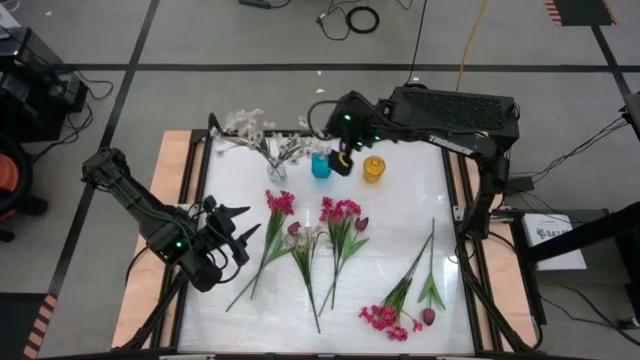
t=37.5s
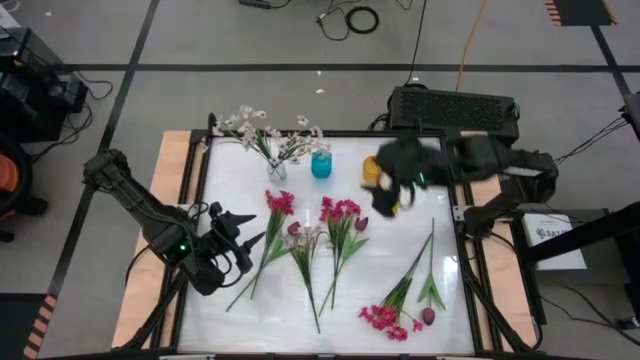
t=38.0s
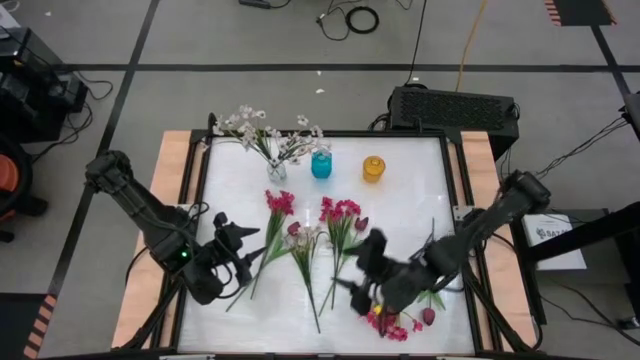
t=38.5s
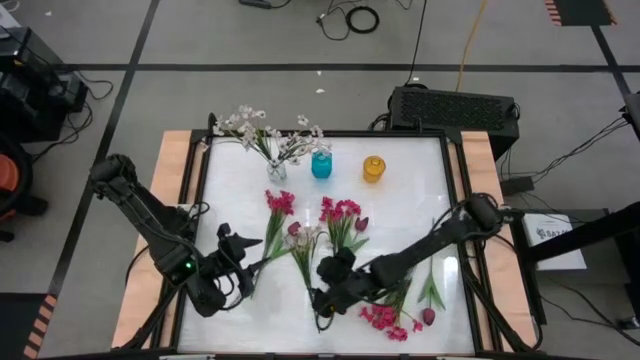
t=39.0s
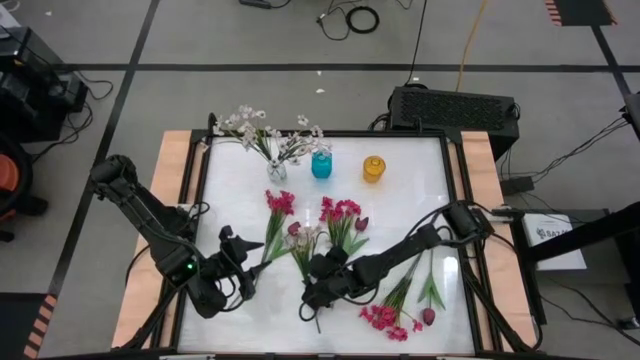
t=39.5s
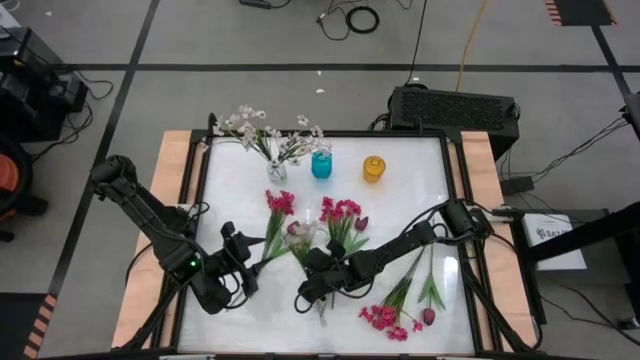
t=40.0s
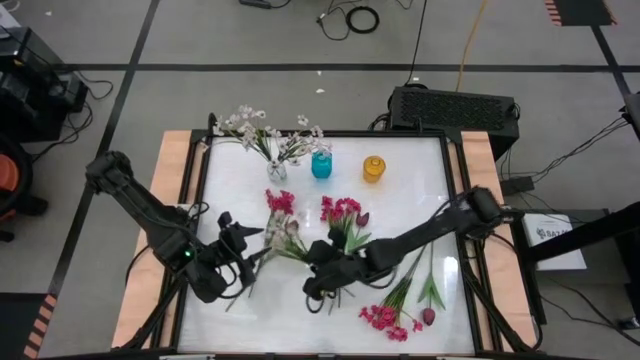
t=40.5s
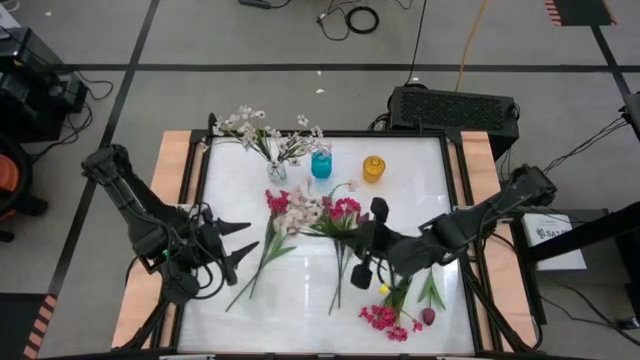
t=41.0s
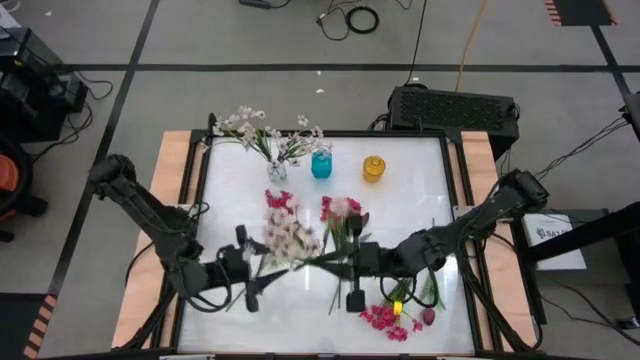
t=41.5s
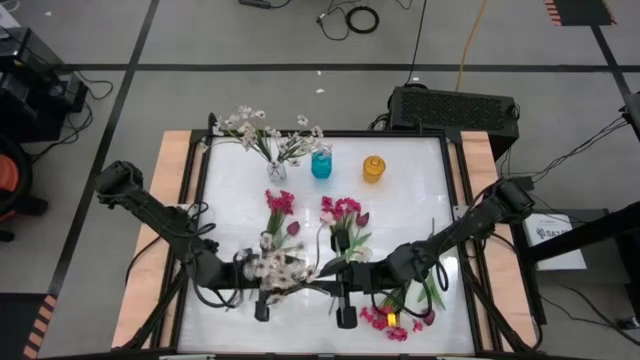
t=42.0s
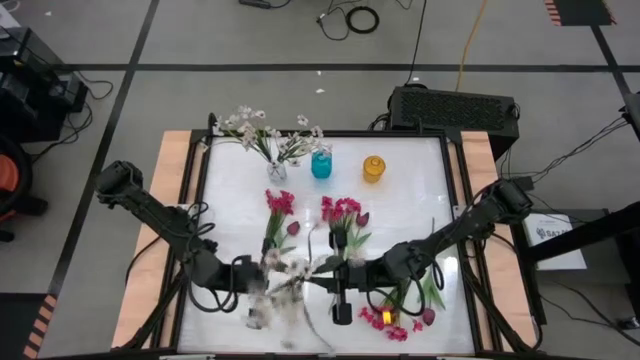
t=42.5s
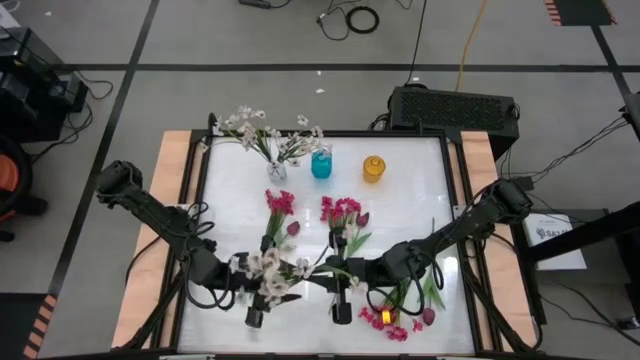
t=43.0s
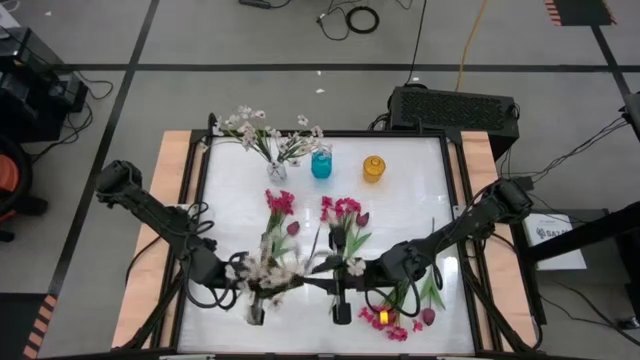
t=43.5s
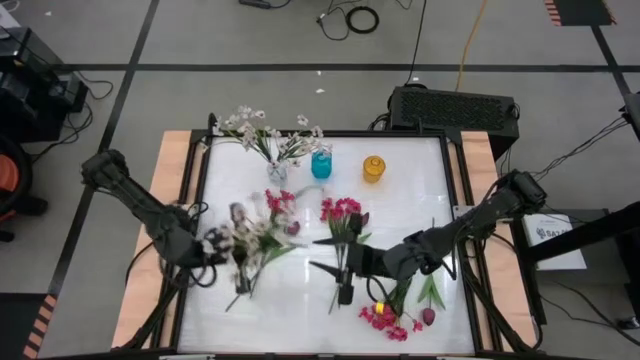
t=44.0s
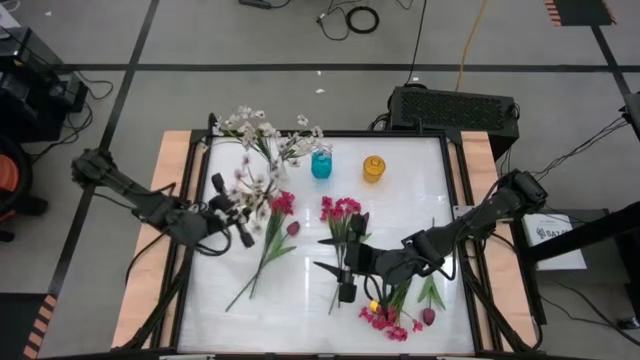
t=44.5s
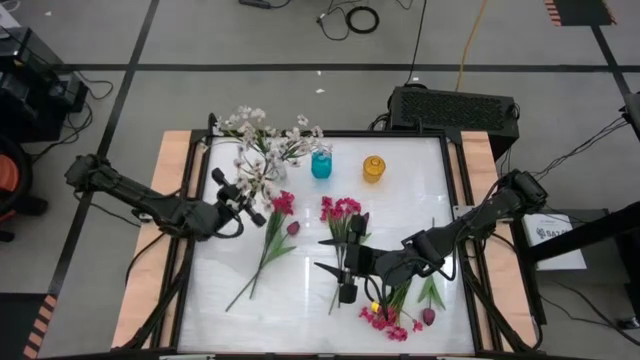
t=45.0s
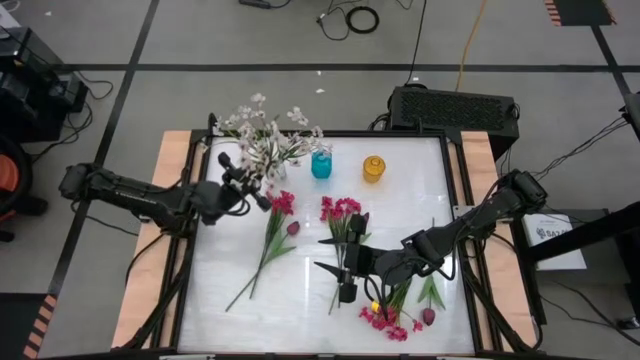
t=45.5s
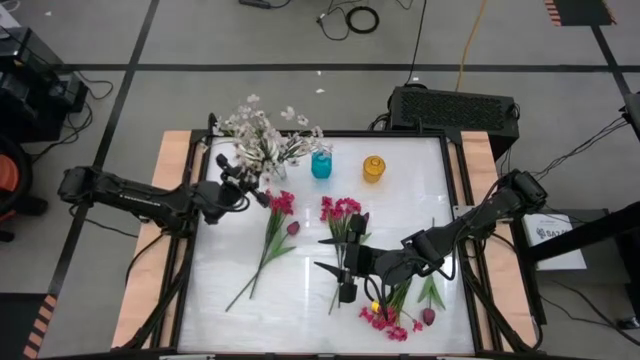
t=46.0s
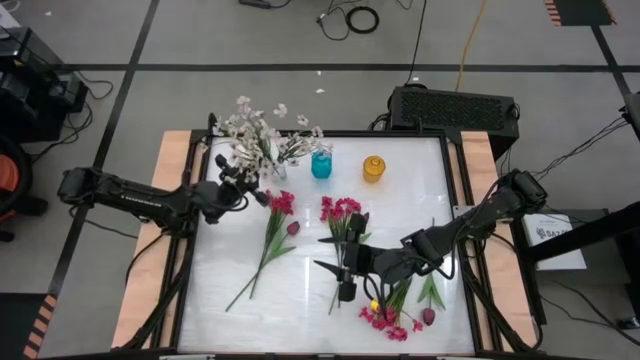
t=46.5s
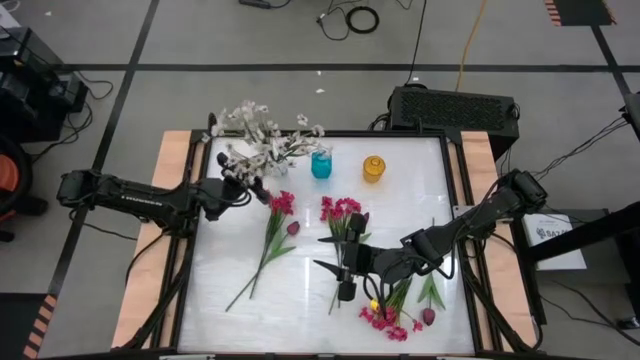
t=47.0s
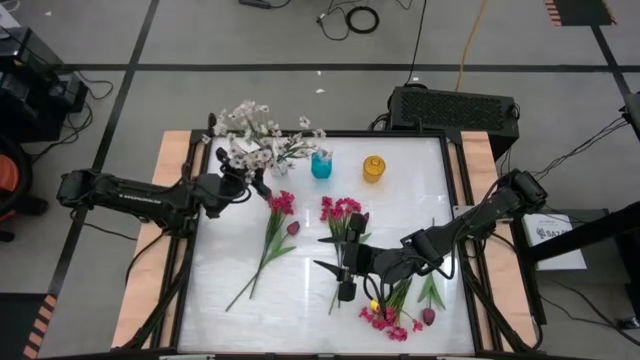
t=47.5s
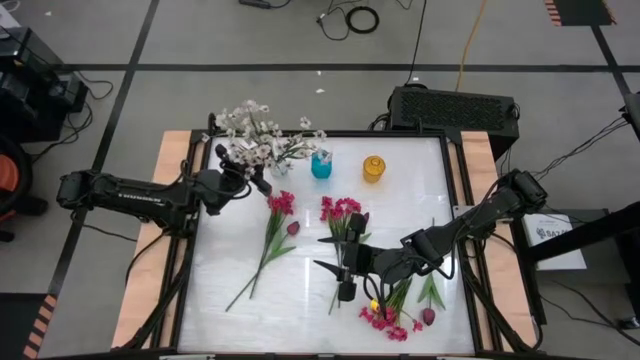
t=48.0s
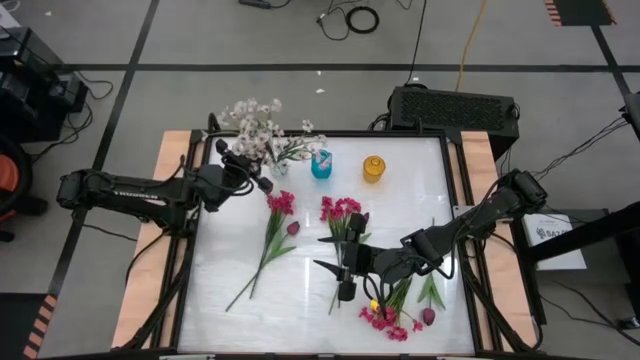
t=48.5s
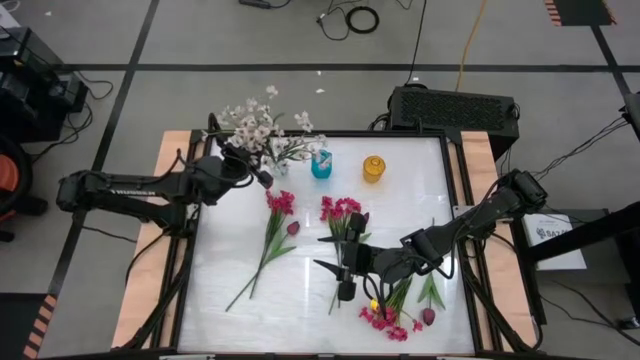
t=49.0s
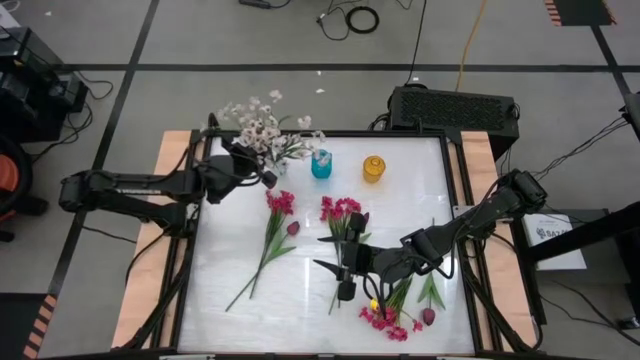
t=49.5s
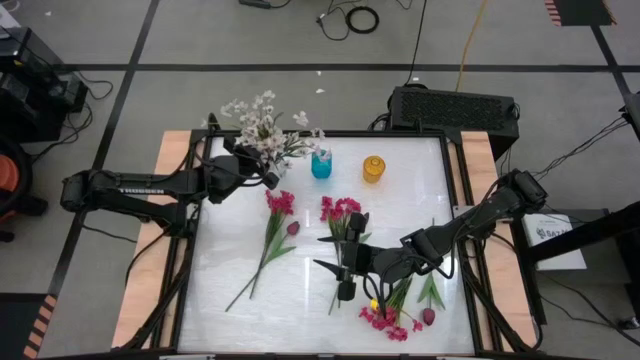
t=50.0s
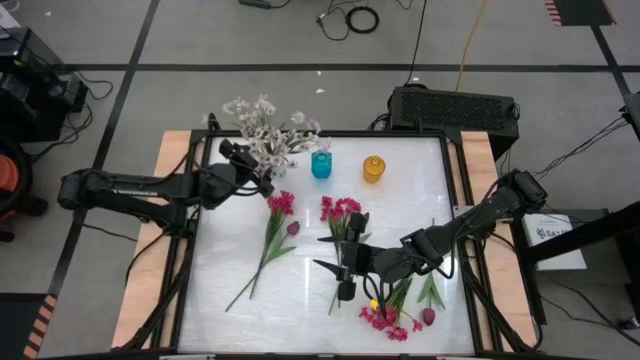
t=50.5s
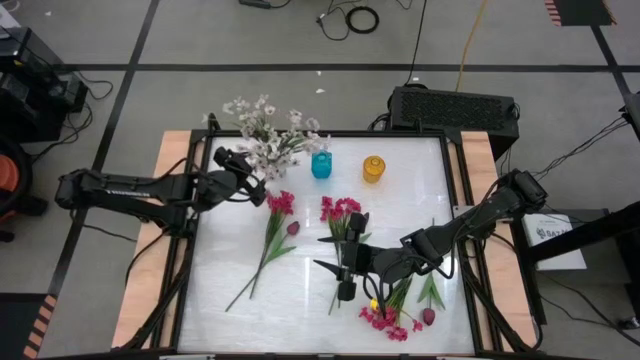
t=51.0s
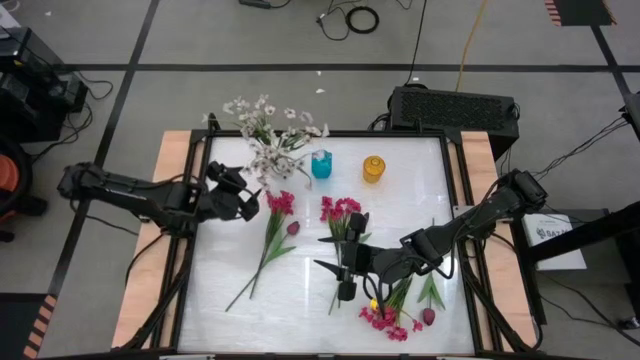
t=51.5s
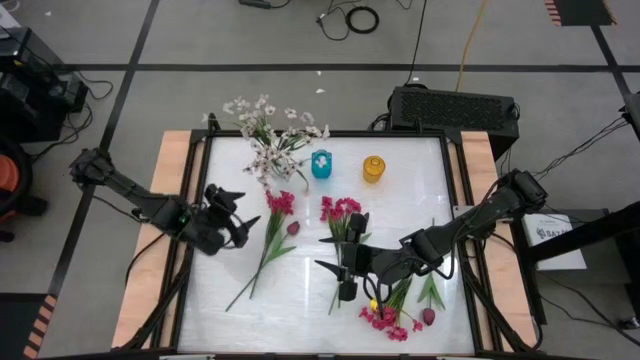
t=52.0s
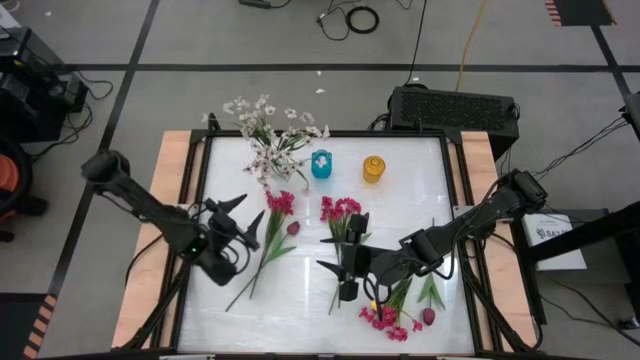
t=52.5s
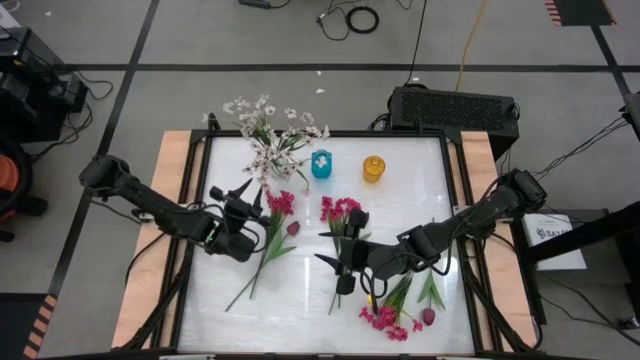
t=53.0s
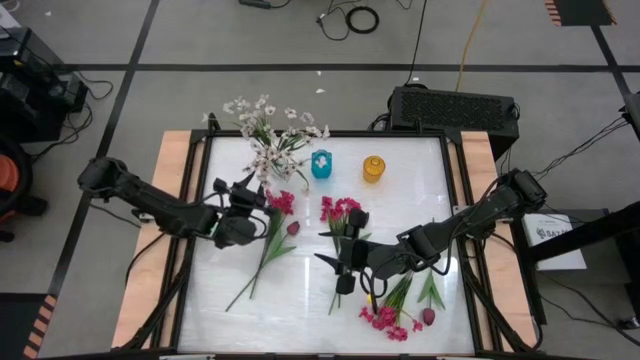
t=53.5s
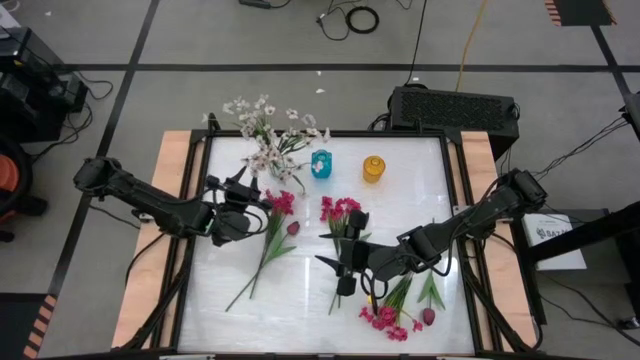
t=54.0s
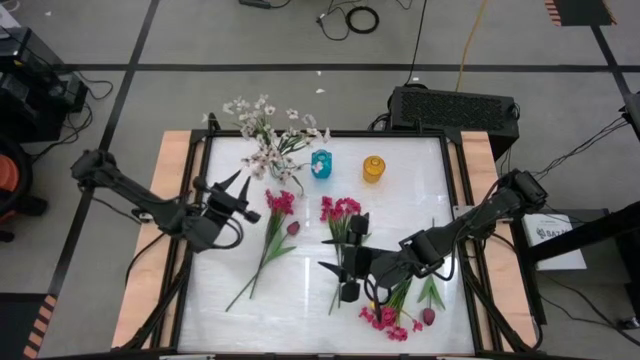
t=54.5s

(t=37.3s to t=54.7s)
Task: Sort flowers into vase by color
Put the white flower into the transparent vase

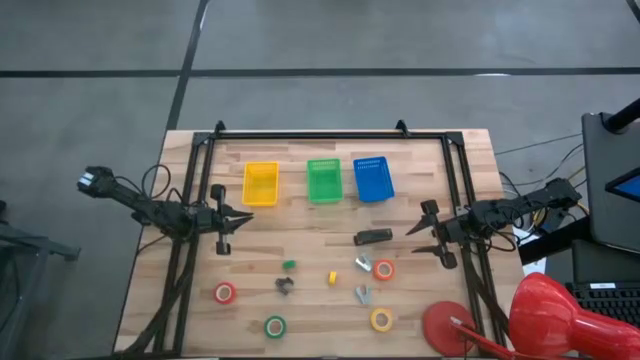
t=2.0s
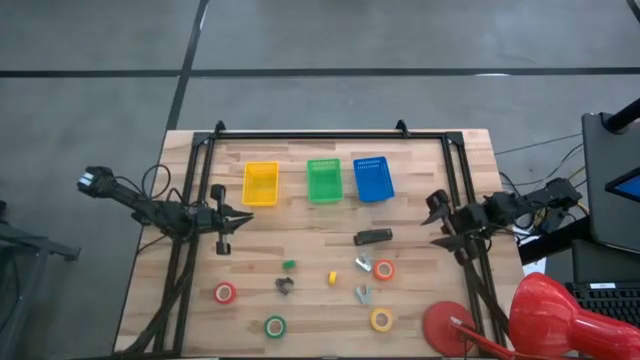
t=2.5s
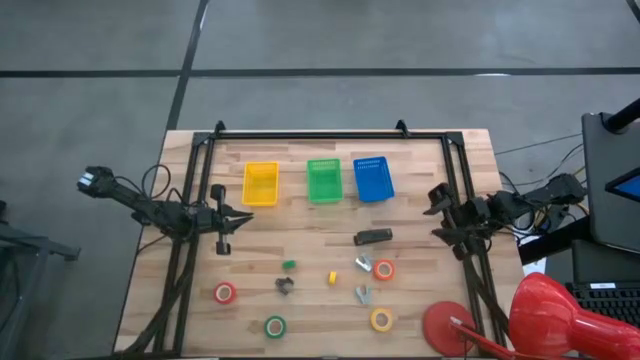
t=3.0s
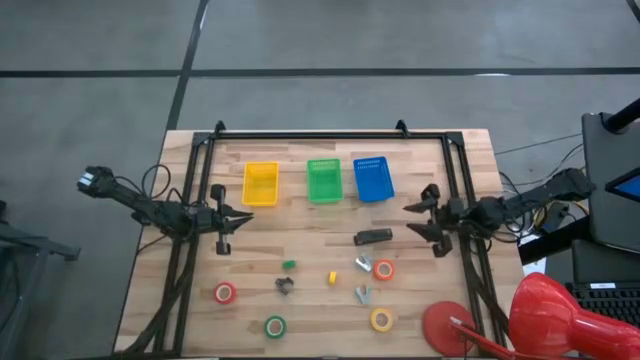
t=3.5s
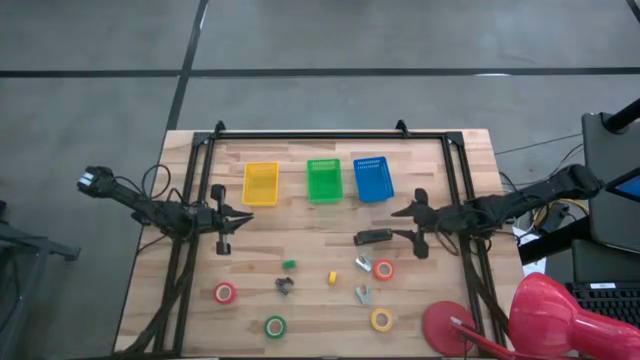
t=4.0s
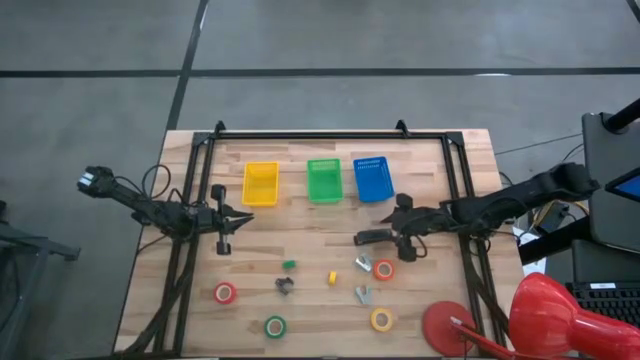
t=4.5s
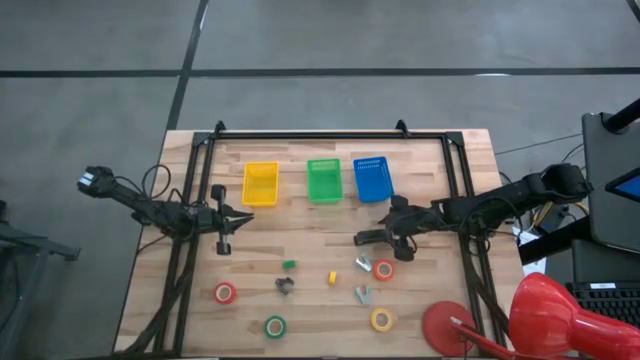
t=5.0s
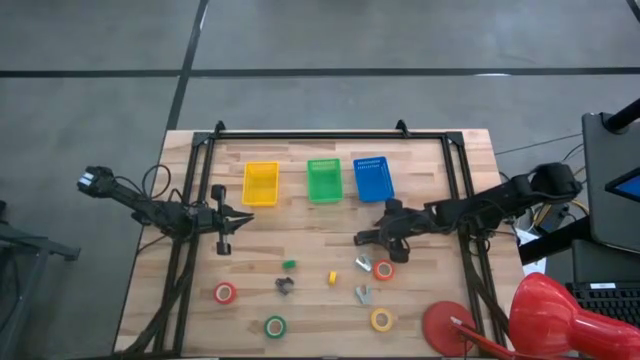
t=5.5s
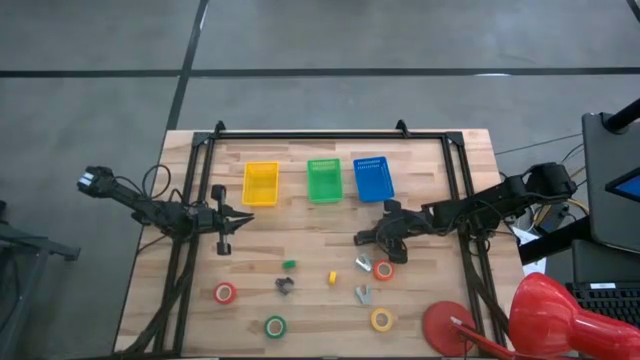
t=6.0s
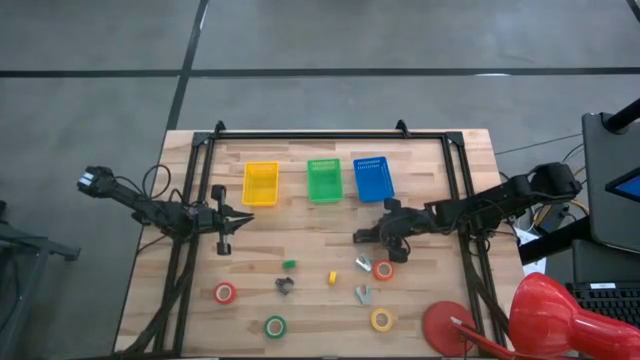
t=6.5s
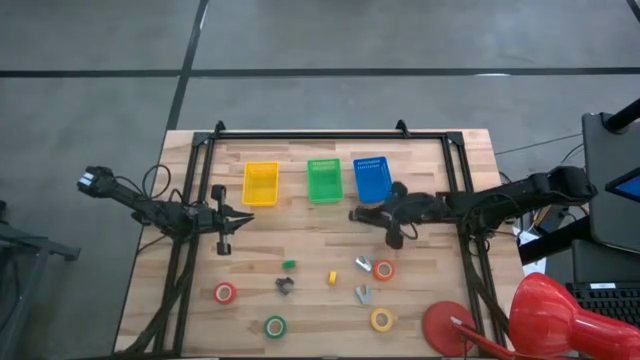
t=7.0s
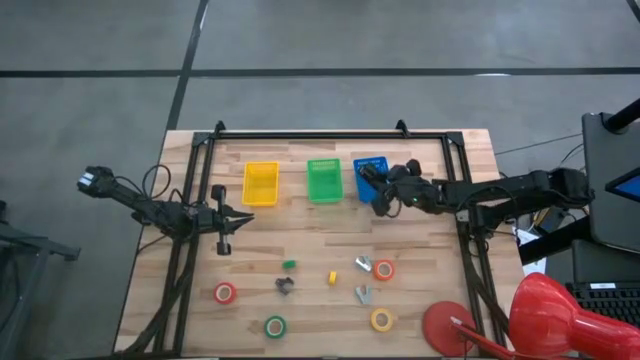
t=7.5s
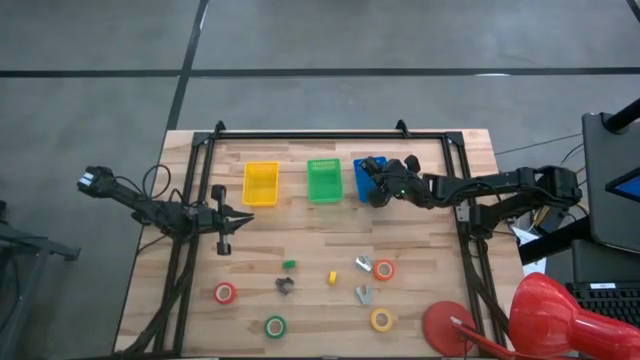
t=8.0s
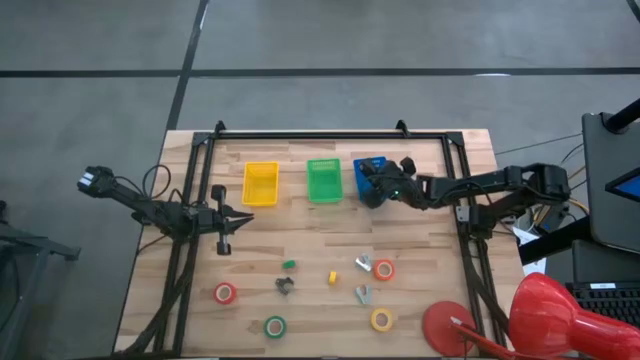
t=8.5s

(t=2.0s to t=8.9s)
Task: Pick and place Stapler, Stapler remover, tape
Put the large black stapler into the blue bin
